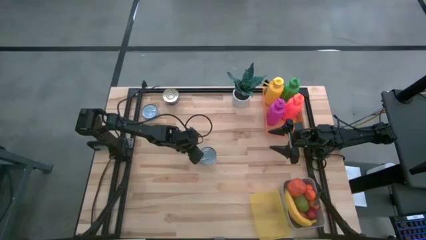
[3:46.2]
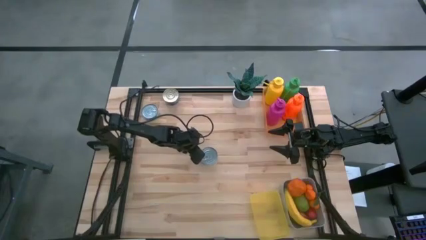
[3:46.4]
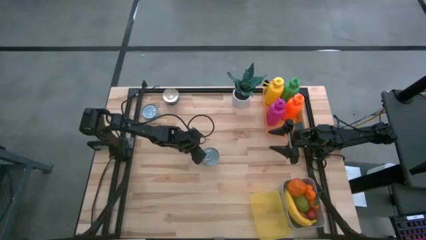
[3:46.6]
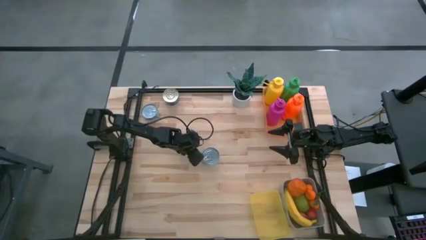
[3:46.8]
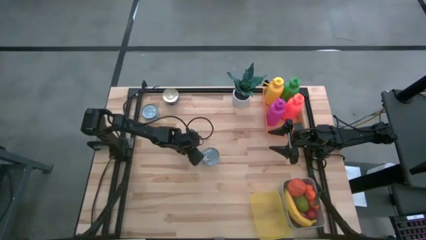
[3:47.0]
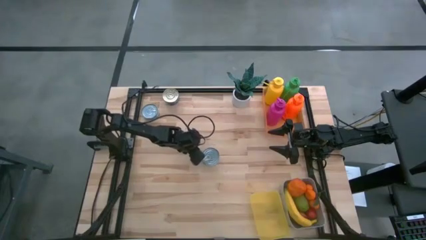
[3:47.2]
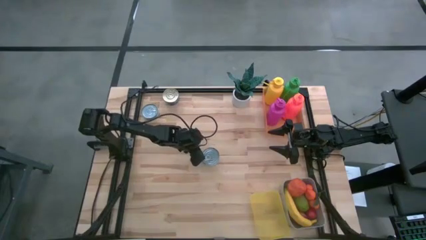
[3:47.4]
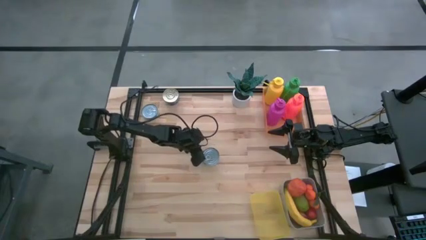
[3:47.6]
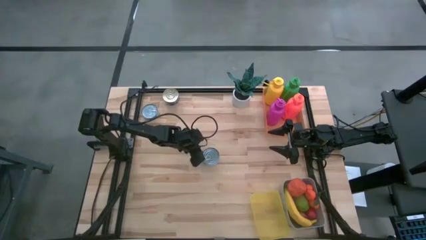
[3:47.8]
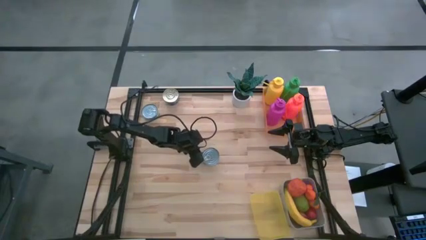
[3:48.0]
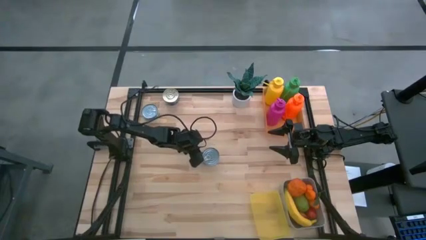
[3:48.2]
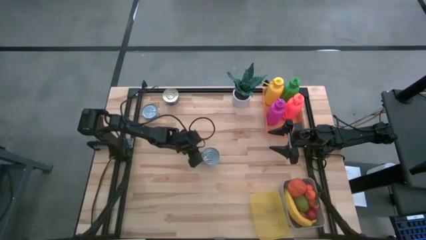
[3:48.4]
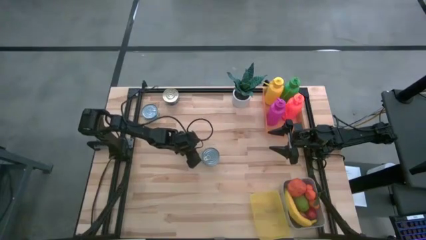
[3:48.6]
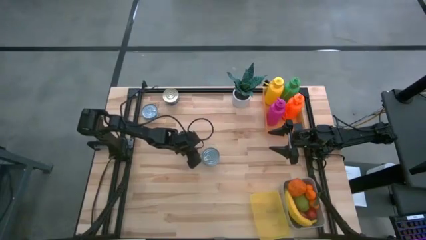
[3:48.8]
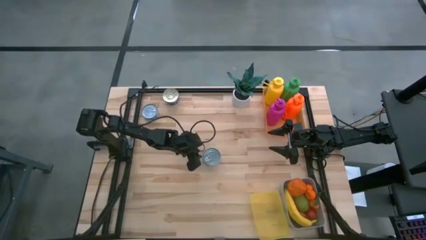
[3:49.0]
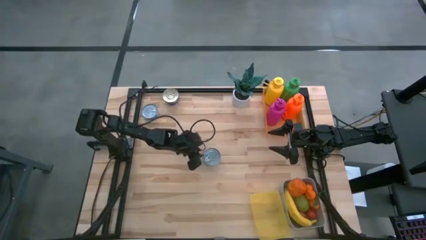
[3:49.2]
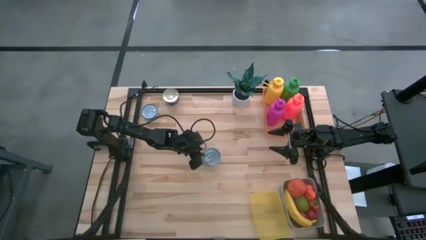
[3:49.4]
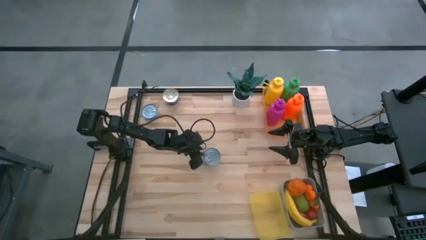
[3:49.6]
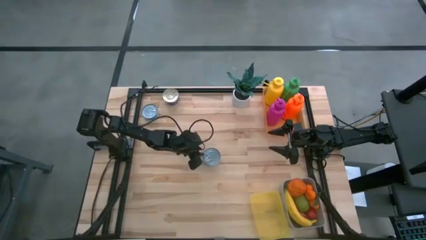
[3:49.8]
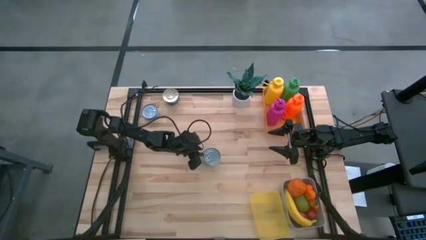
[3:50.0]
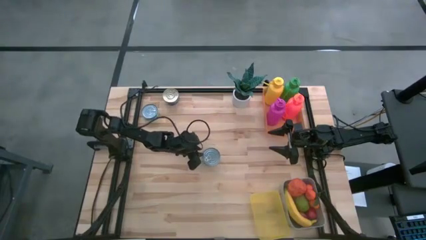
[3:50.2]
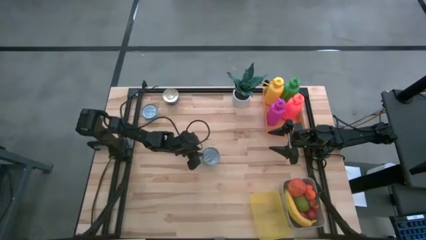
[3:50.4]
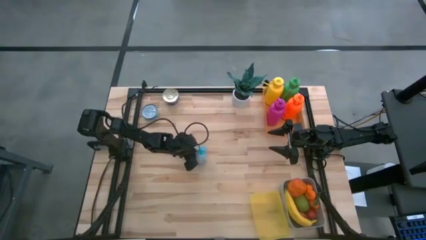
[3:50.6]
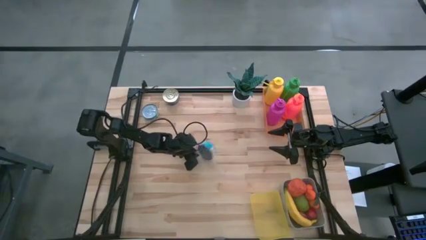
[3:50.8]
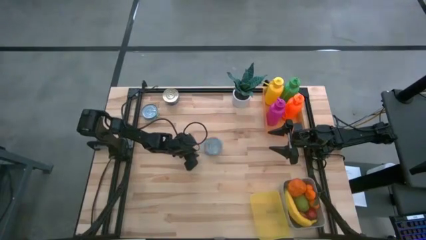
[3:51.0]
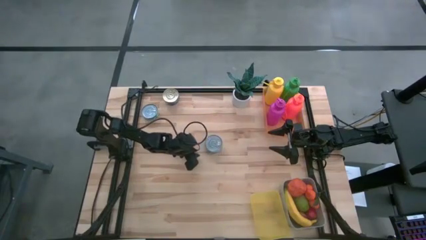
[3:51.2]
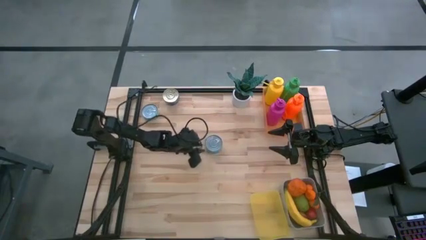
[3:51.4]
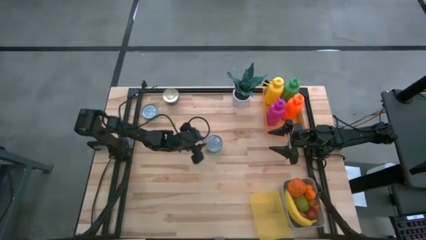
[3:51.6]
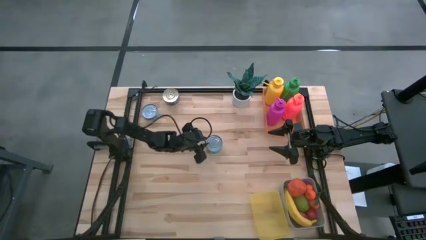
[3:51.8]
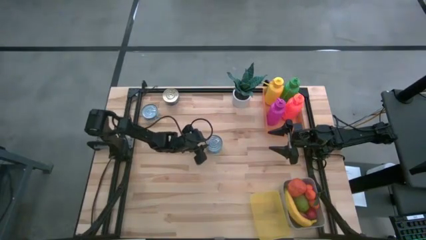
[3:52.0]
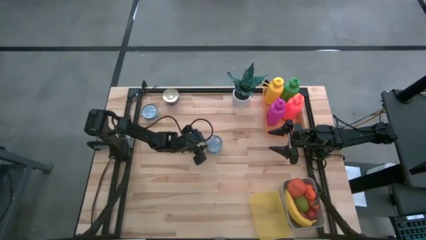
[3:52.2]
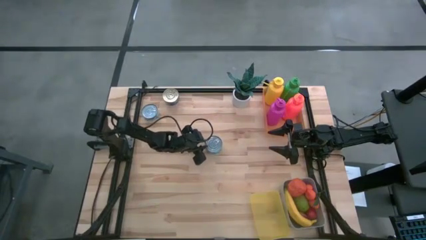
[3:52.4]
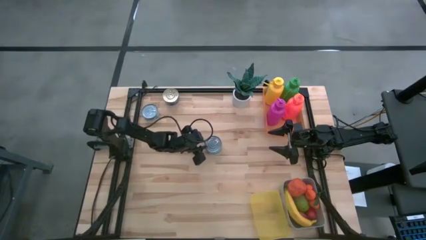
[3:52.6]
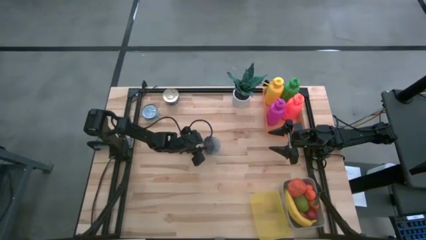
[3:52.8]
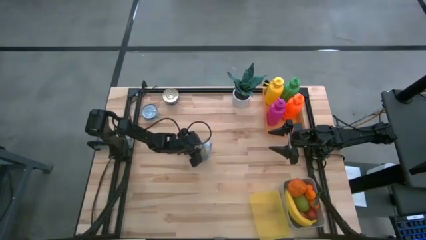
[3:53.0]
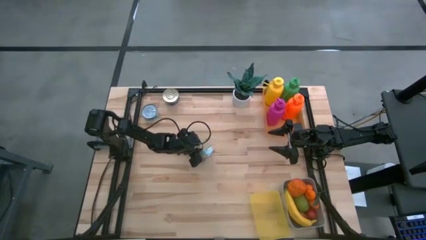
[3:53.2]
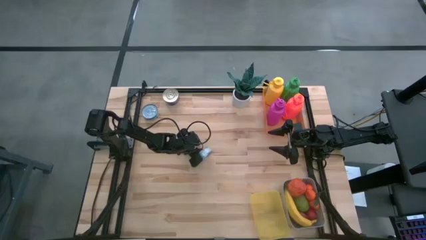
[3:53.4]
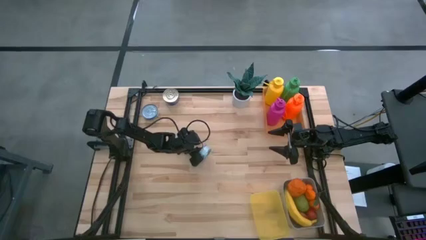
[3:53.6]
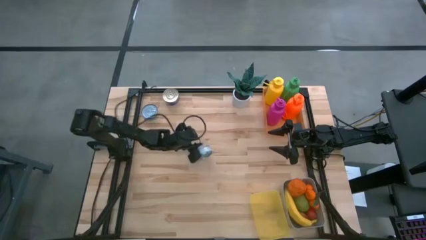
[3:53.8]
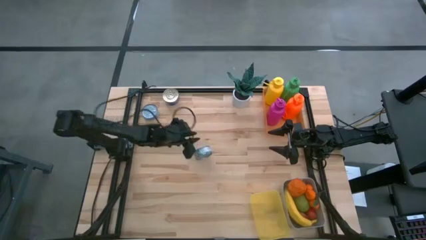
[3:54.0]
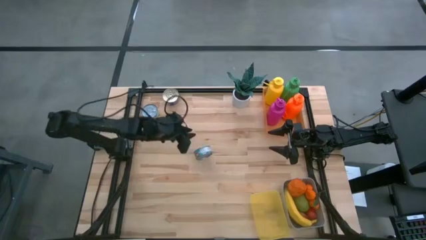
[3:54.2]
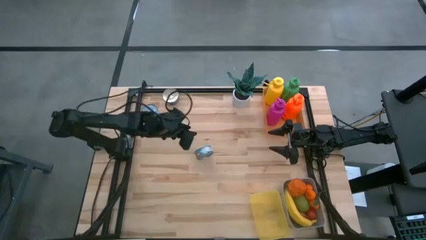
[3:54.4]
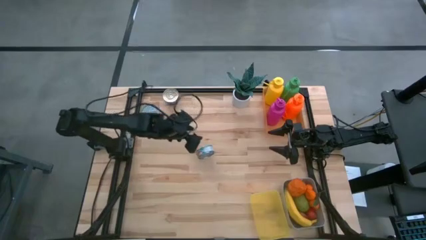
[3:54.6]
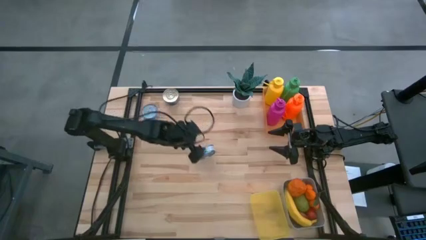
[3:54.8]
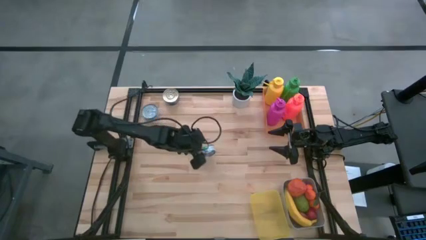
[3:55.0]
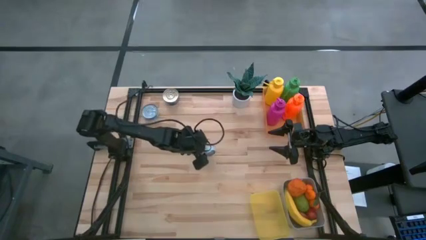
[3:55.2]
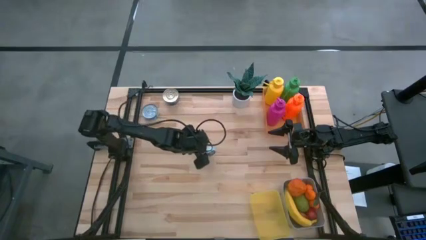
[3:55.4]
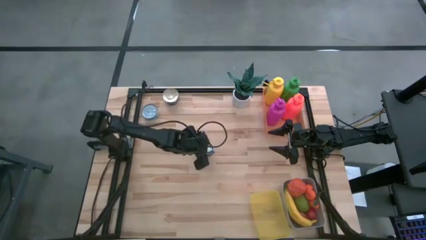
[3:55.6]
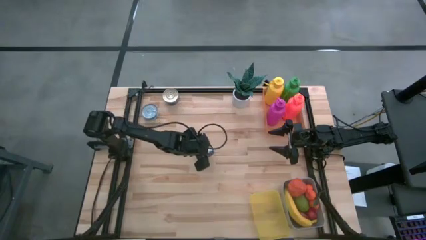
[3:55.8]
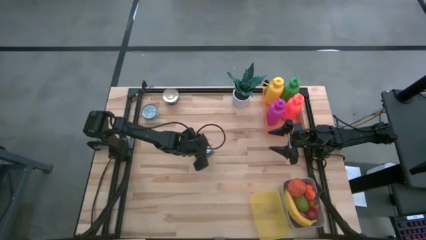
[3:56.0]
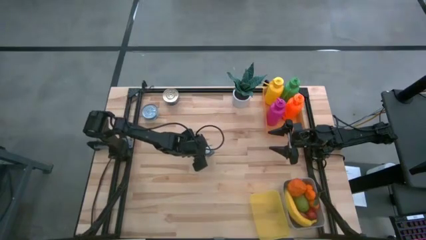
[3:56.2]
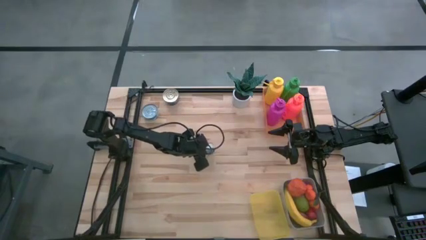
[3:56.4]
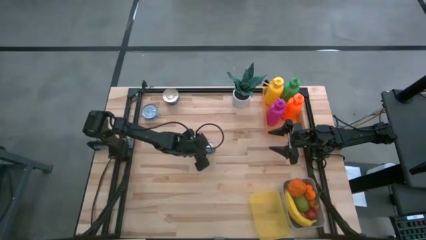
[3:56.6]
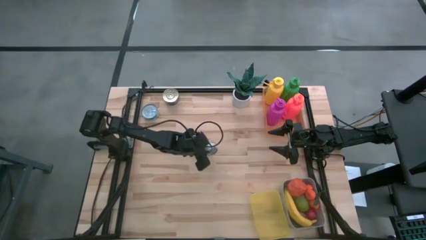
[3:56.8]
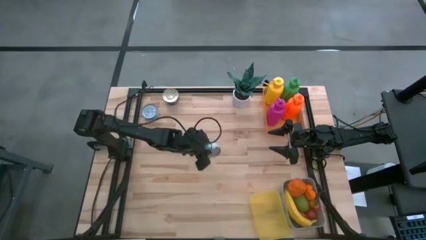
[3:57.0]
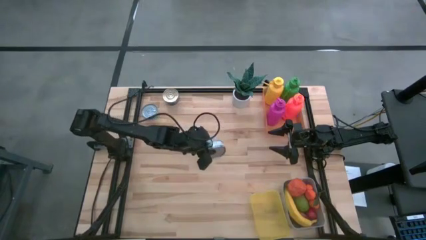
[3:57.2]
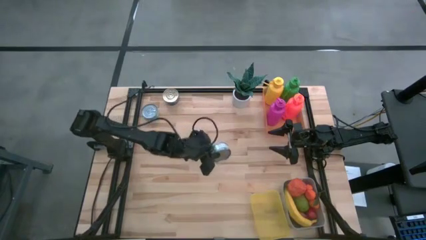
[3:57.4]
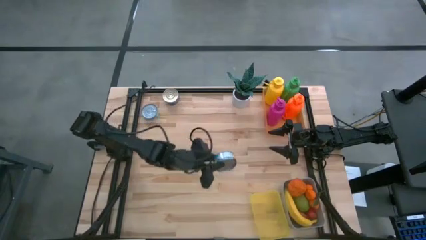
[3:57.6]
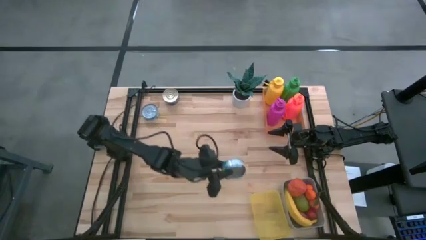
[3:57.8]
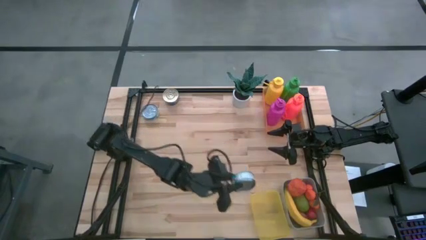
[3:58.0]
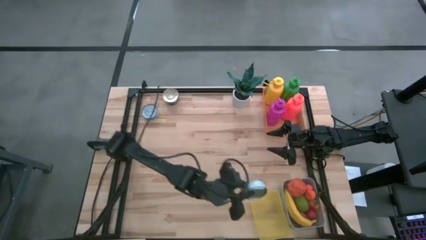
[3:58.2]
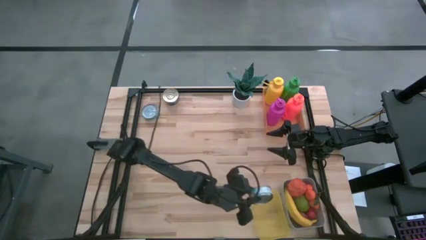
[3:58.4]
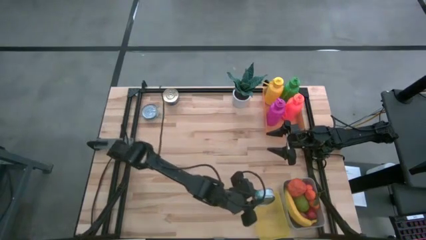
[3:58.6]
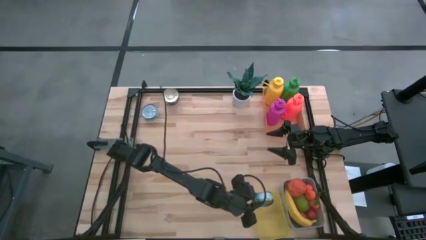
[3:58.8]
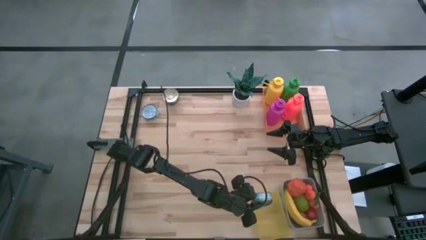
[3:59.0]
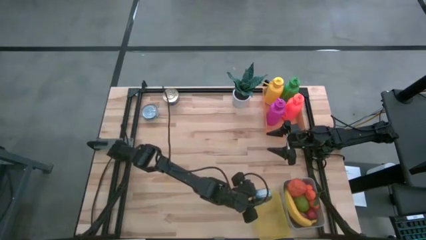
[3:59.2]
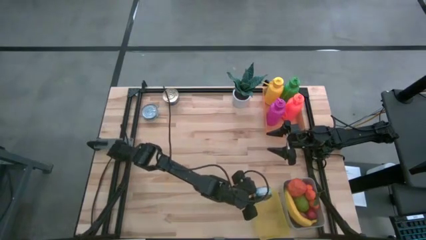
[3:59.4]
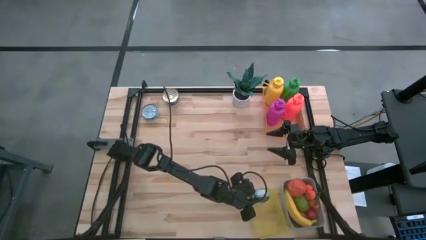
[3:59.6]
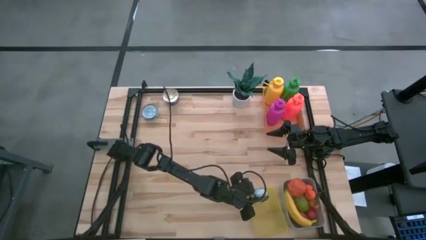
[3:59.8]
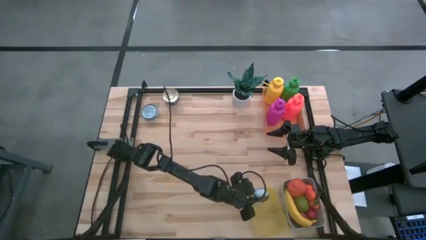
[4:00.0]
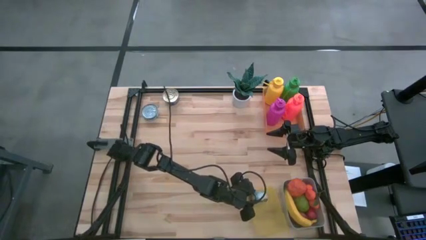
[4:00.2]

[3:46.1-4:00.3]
Task: Pick & Place Food Item
Put the blue tuna can into the yellow bin
